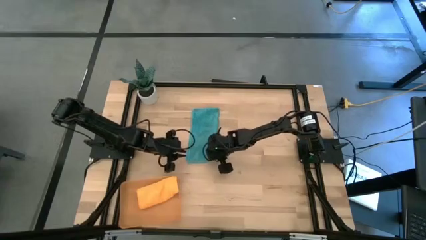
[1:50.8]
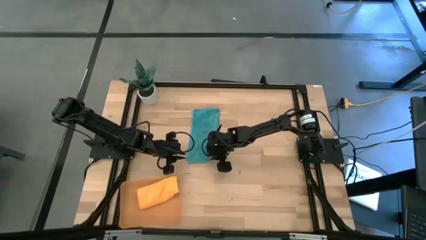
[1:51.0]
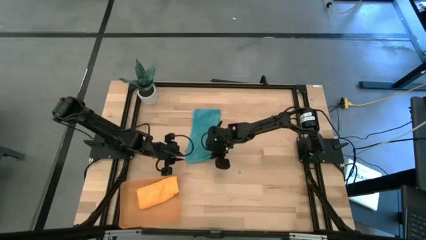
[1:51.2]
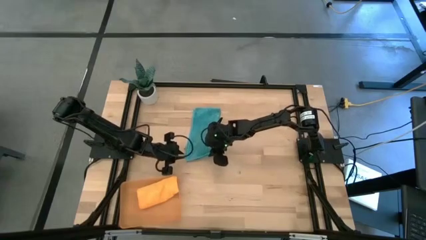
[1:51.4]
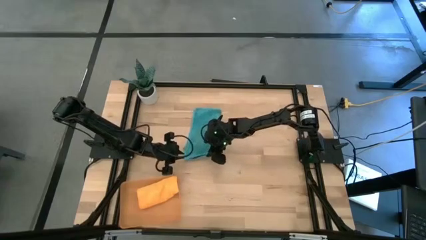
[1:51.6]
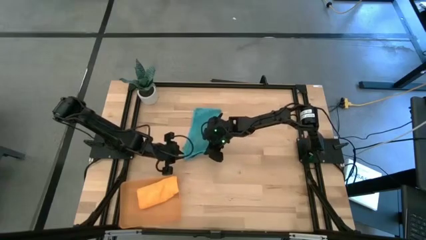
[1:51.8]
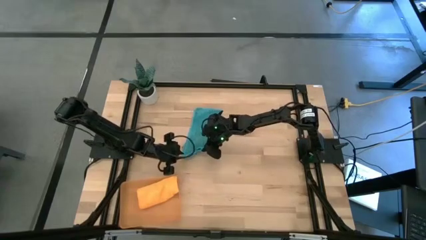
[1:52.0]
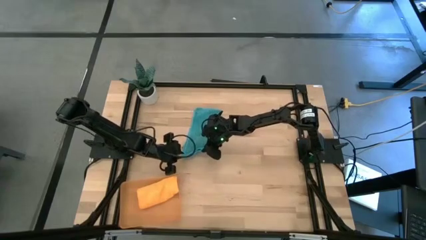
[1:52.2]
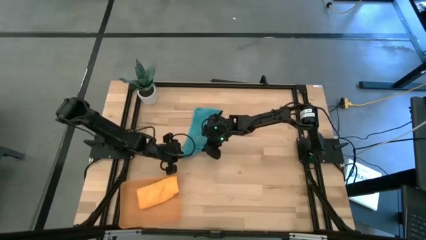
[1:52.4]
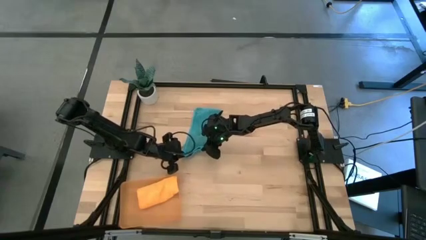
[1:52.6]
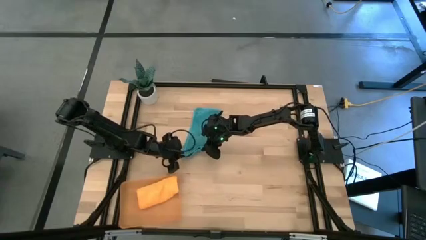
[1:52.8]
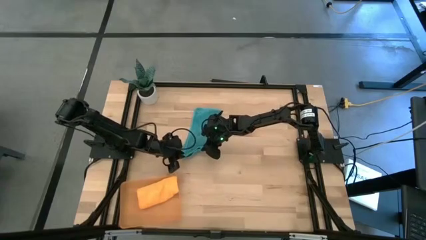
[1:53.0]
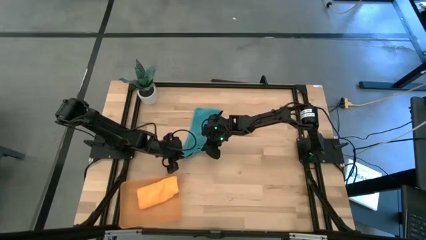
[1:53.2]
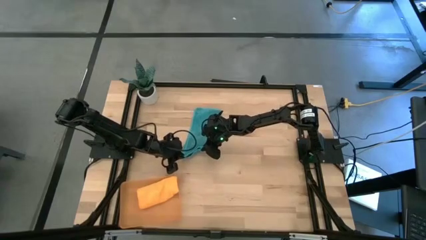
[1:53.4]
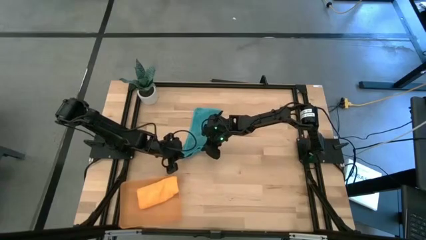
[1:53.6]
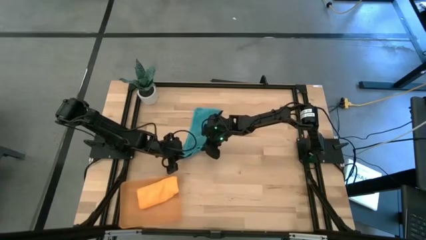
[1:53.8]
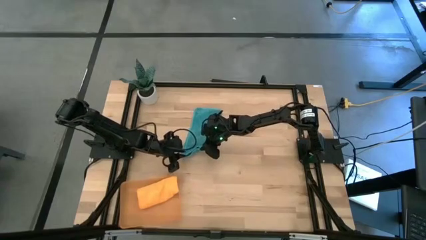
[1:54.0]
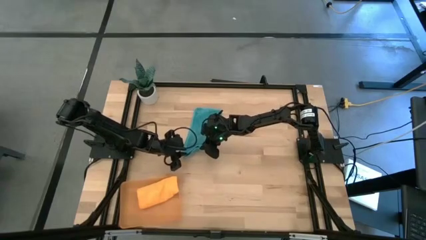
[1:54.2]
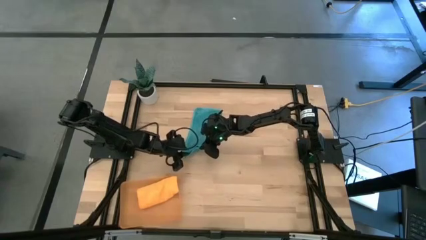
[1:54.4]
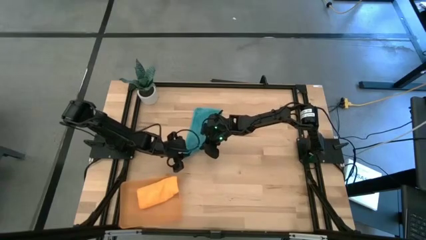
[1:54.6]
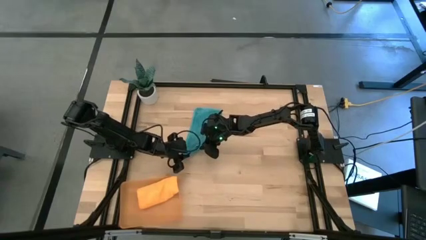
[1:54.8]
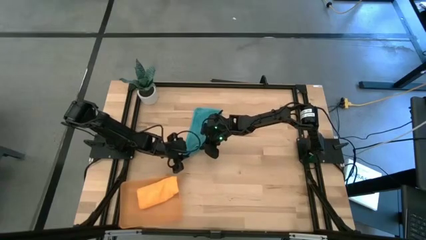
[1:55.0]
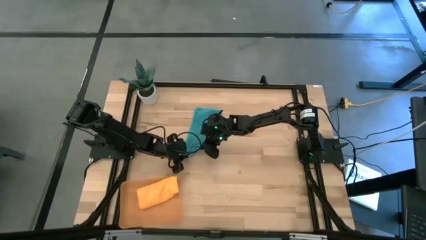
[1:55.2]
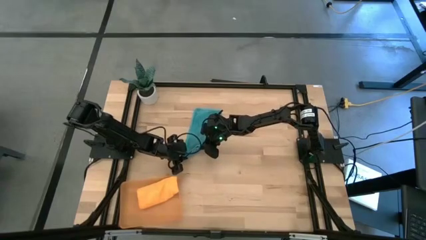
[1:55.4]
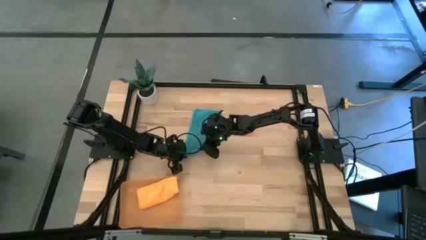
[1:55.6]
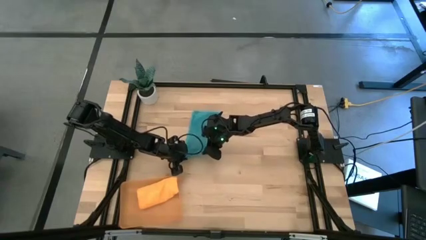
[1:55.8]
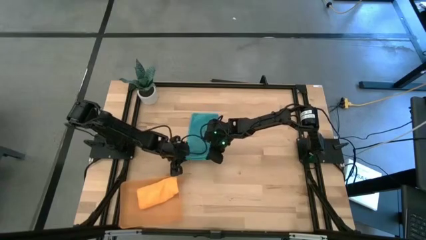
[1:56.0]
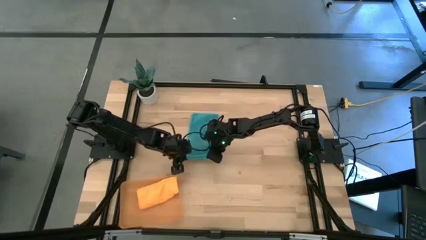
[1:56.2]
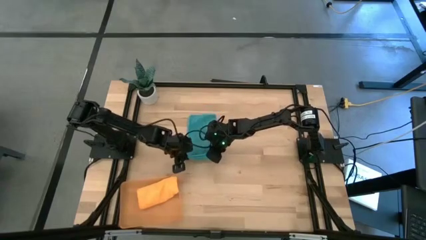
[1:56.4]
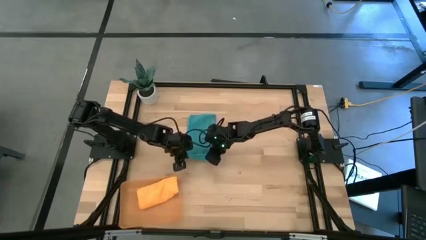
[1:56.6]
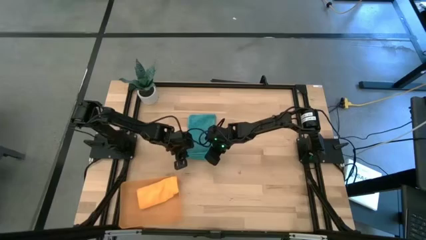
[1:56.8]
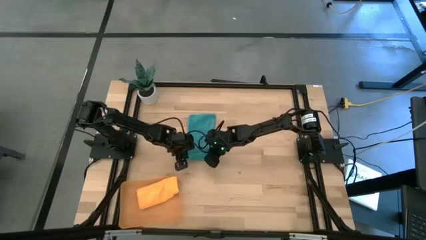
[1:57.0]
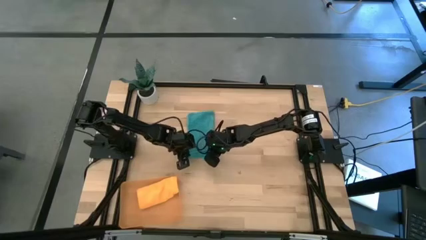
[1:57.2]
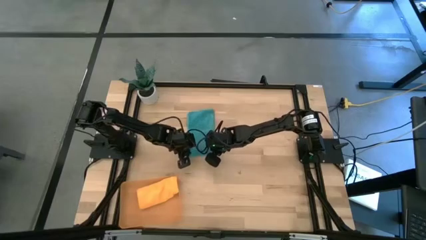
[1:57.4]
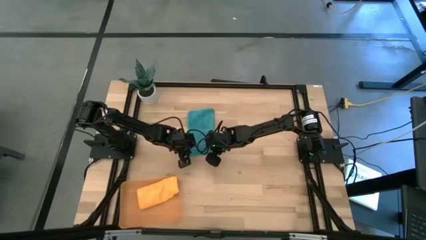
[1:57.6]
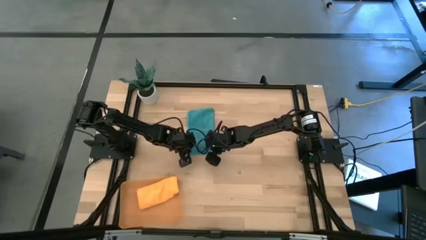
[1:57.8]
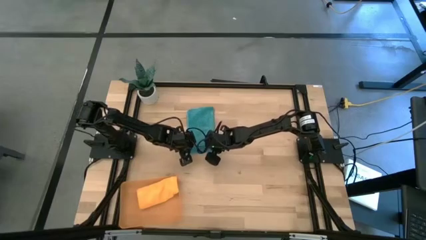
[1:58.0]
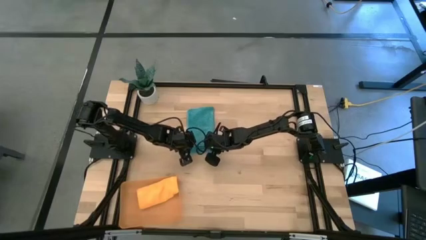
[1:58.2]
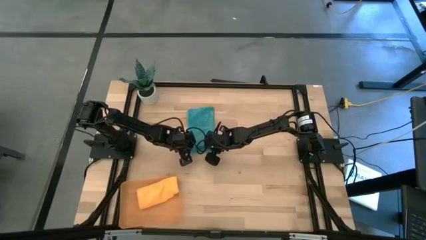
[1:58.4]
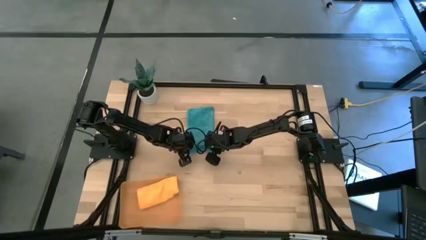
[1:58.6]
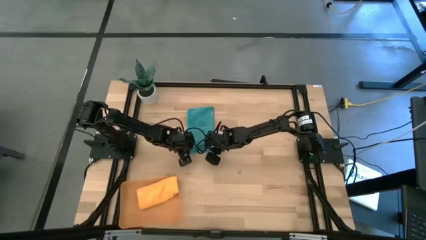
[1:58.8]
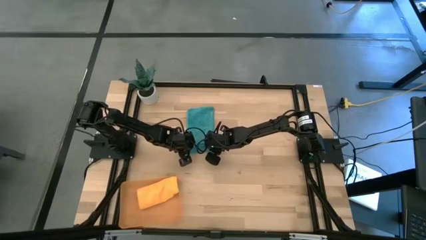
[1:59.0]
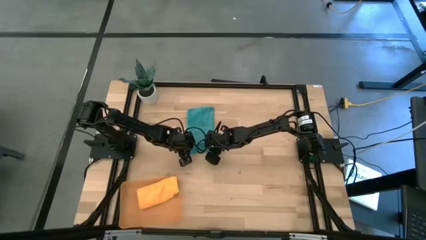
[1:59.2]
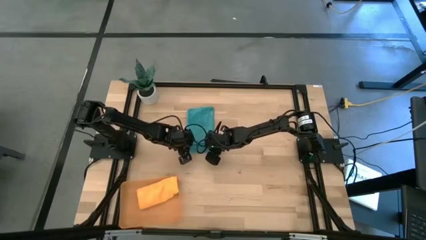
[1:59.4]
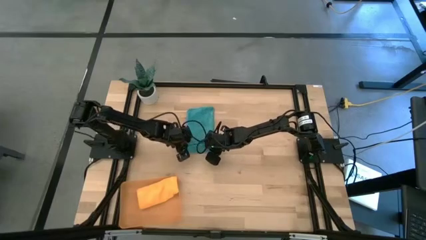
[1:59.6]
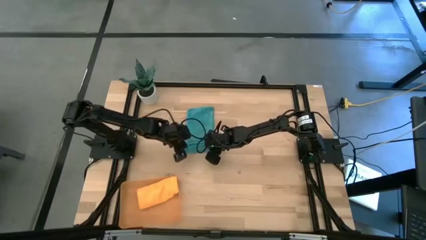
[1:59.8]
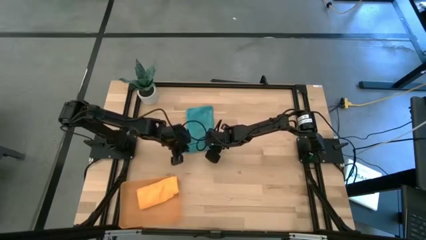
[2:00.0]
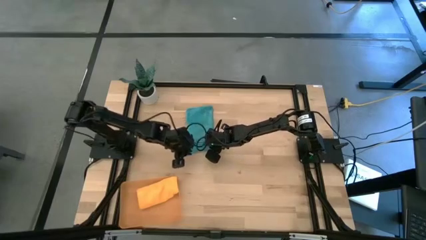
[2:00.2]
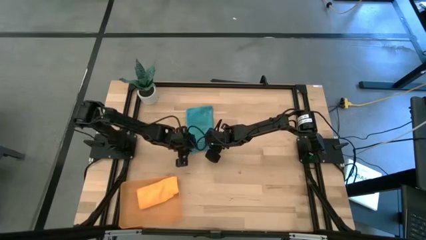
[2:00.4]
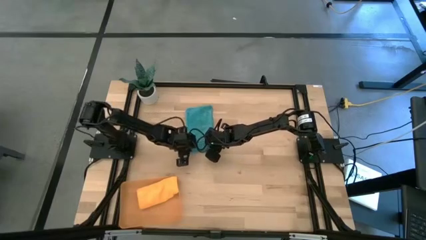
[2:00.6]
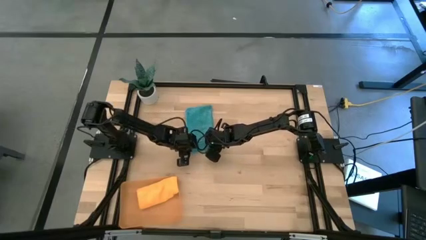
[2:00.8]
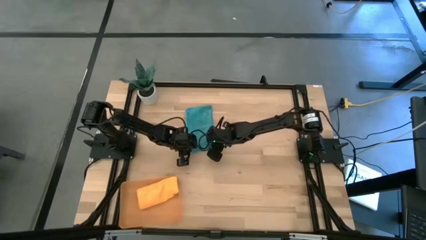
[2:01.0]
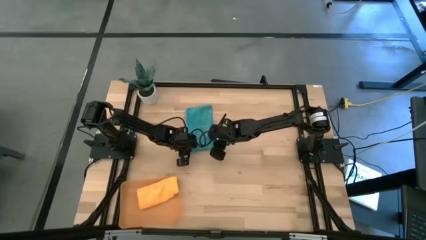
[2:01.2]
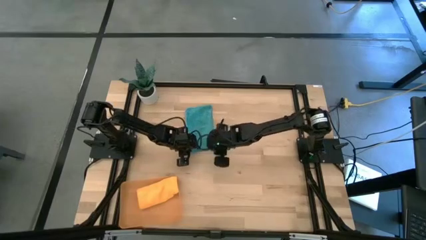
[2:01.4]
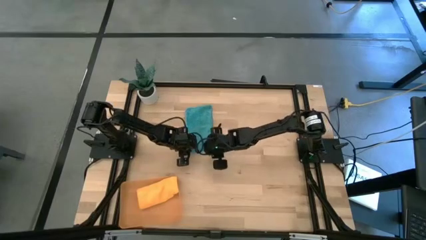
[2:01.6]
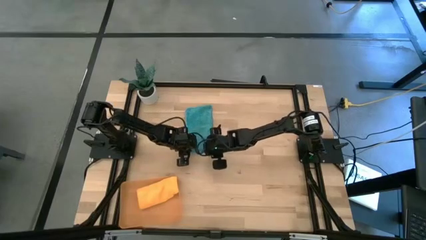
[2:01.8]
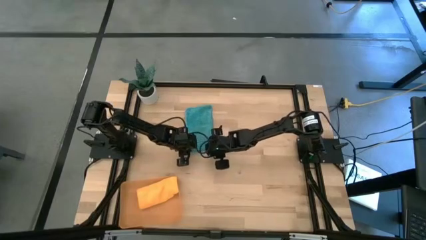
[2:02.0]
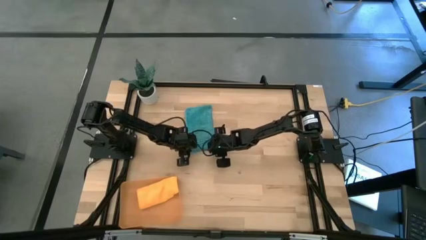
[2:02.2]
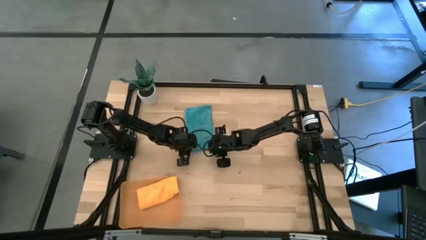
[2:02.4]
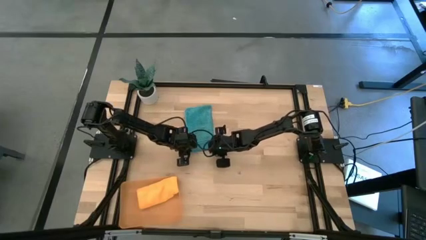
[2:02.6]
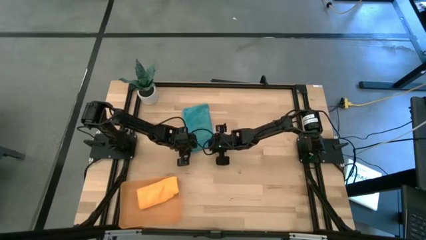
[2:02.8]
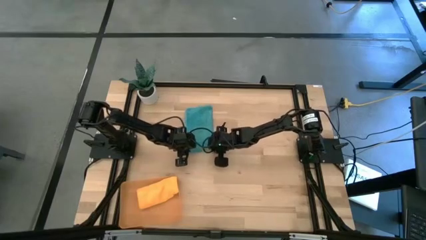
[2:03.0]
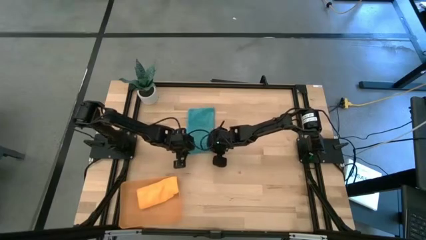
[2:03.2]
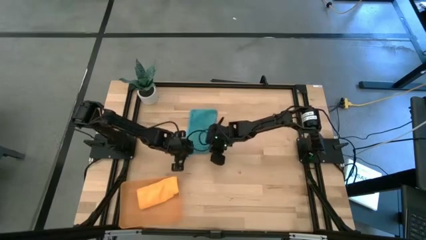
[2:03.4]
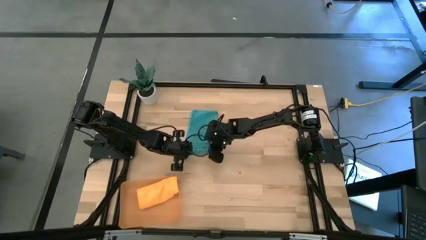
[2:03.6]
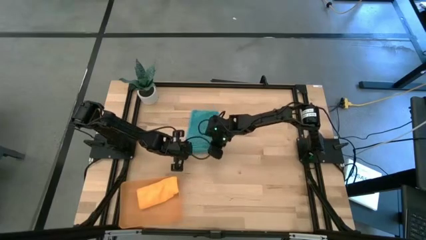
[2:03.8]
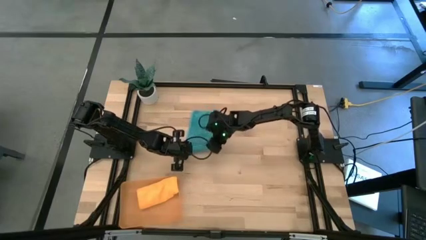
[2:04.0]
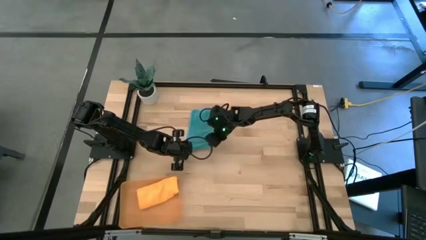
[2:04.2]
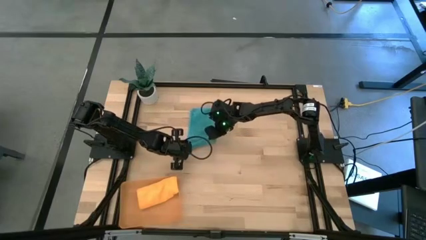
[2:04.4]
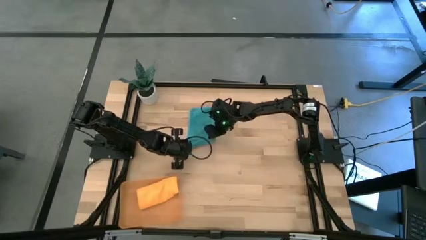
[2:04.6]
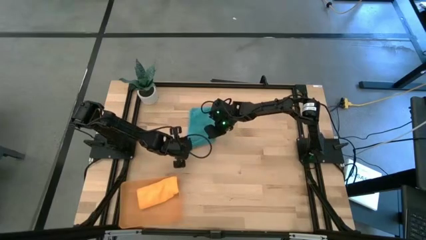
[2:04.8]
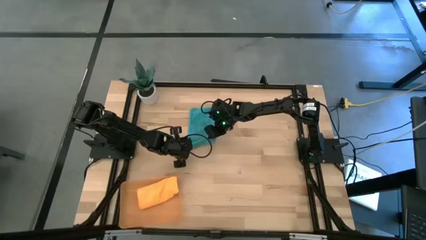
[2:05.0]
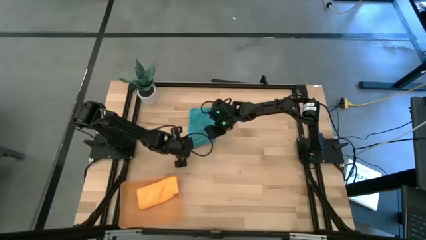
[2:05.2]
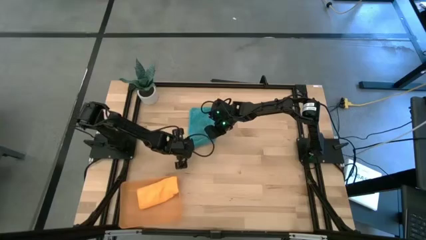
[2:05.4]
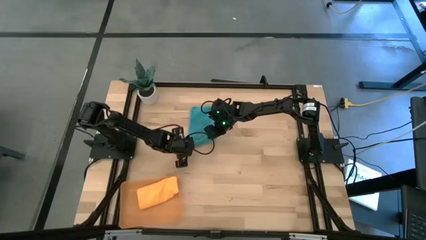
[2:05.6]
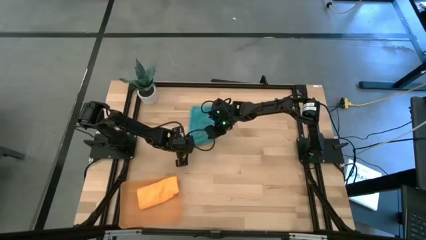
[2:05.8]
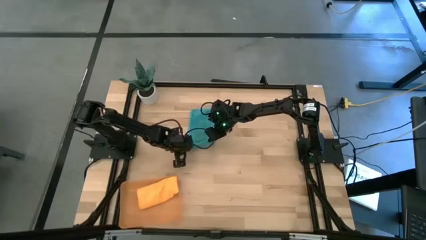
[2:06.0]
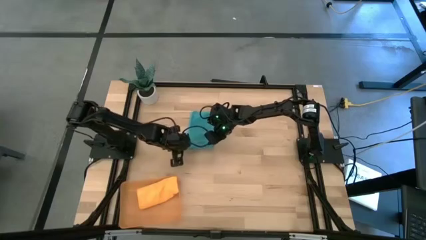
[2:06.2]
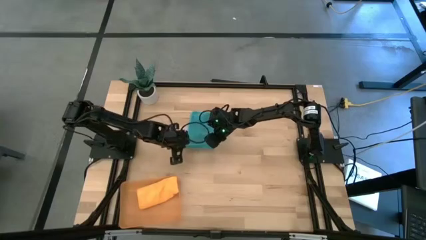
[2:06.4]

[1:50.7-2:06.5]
Task: Roll microfiber towels into tight, uniform cylinder then place into a basket
Roll the blue microfiber towel

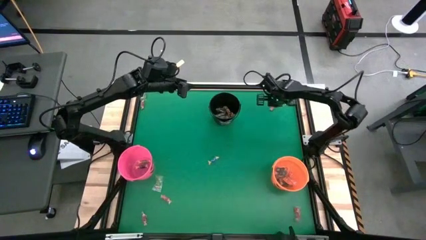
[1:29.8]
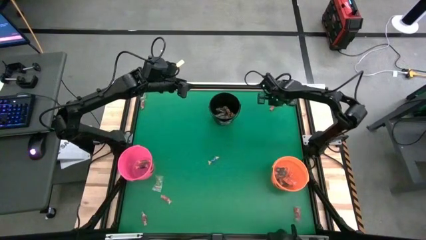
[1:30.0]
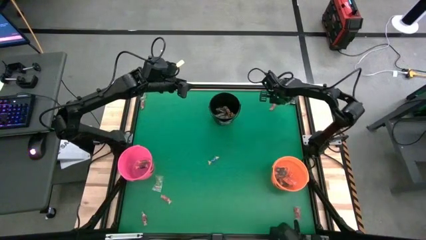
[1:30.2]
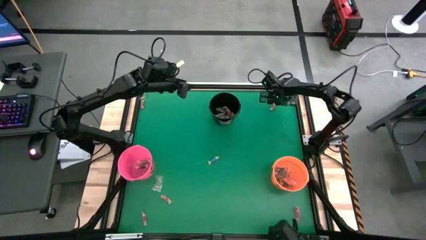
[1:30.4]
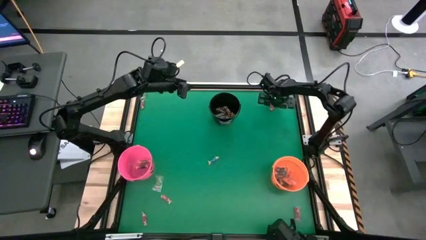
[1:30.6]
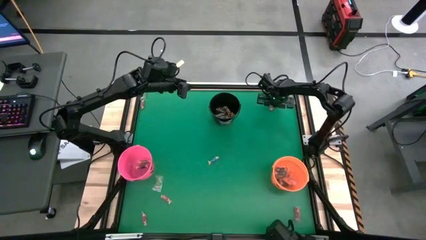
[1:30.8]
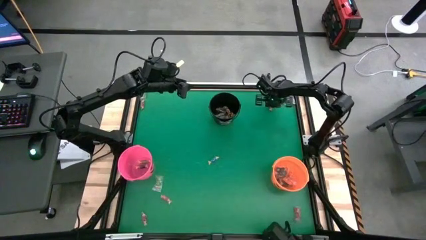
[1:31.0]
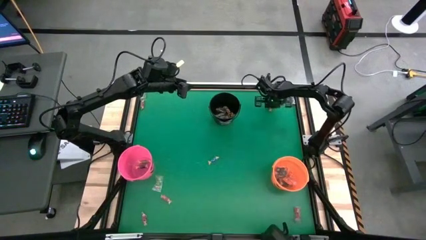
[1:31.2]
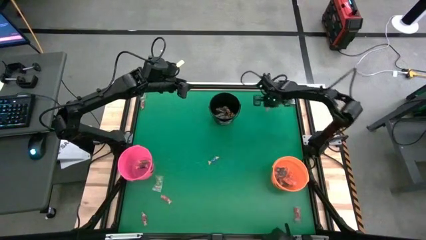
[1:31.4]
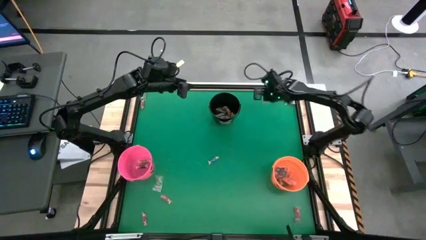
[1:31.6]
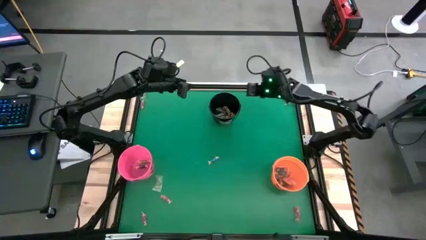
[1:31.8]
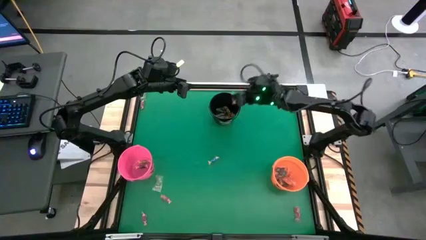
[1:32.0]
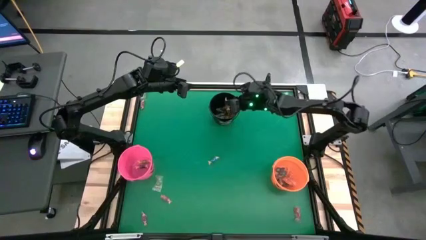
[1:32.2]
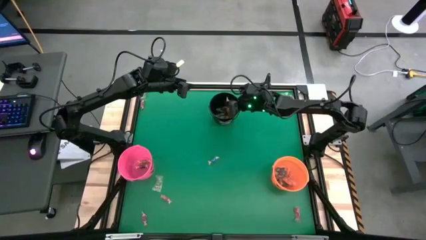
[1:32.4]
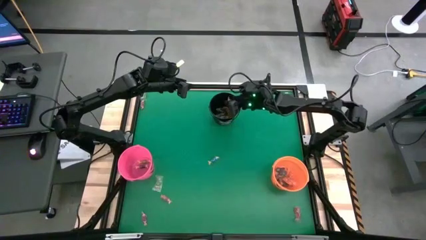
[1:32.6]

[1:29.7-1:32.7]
Task: Sort candy by brand, put in halloween buckets
Put the red candy into the black bucket
